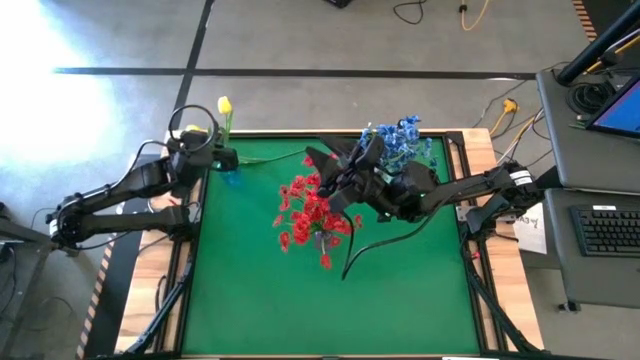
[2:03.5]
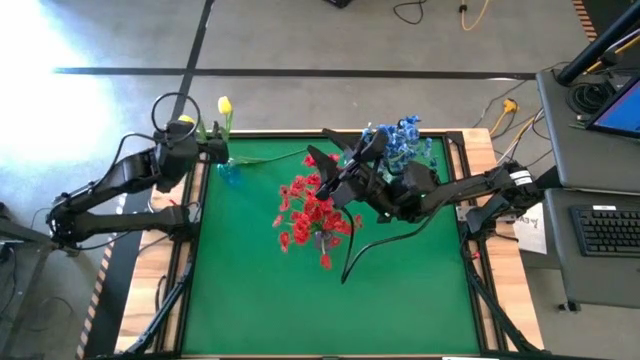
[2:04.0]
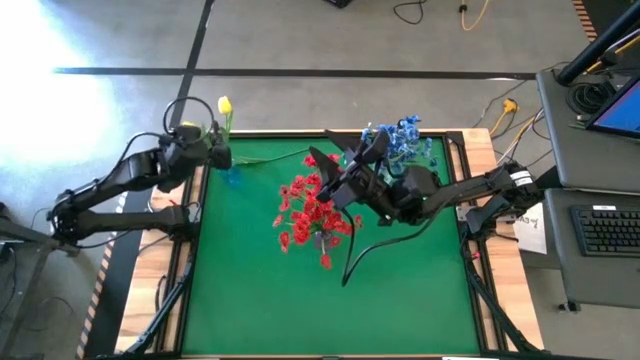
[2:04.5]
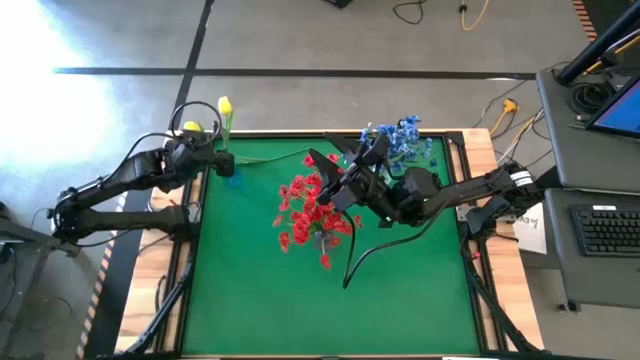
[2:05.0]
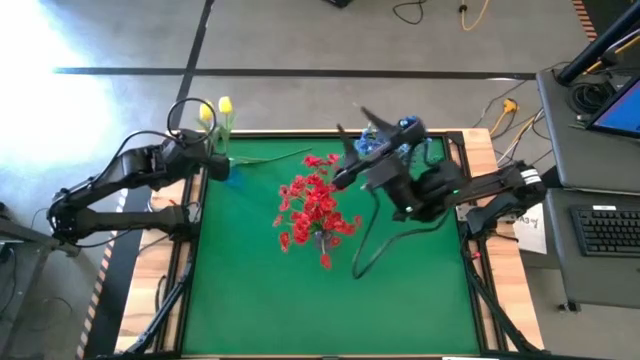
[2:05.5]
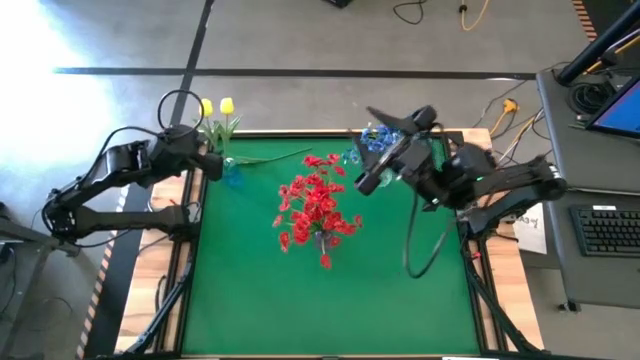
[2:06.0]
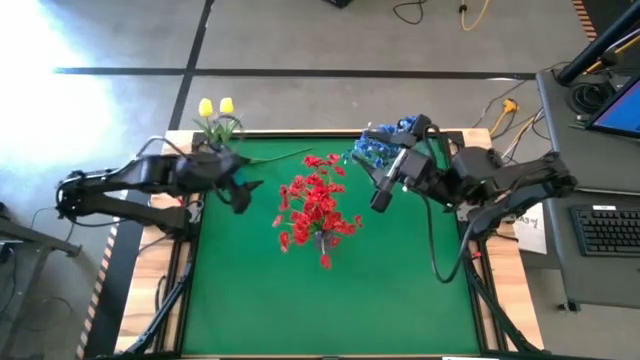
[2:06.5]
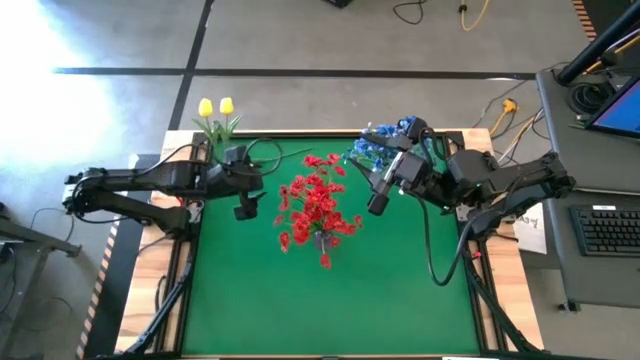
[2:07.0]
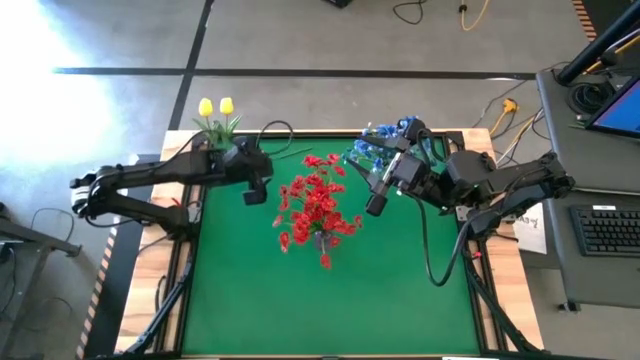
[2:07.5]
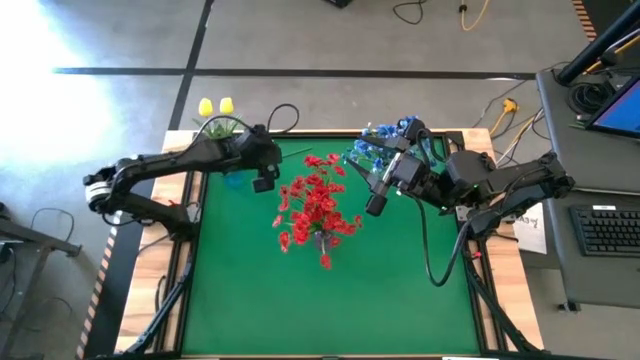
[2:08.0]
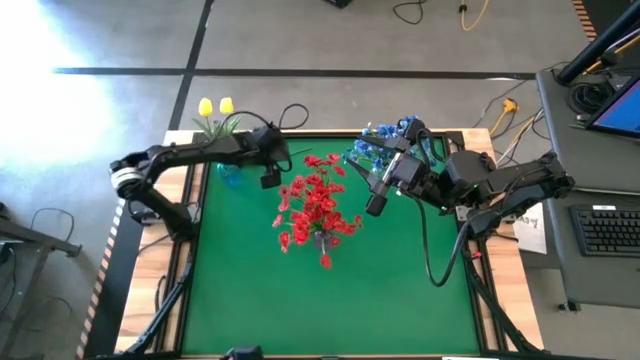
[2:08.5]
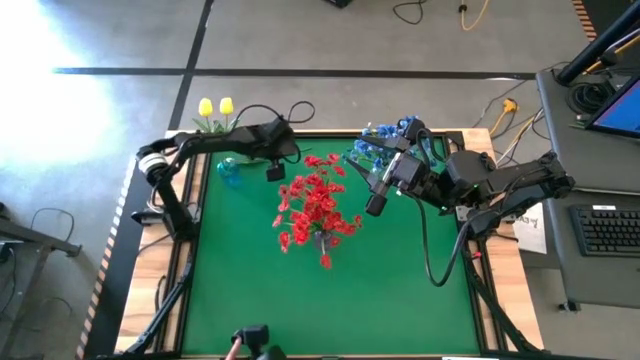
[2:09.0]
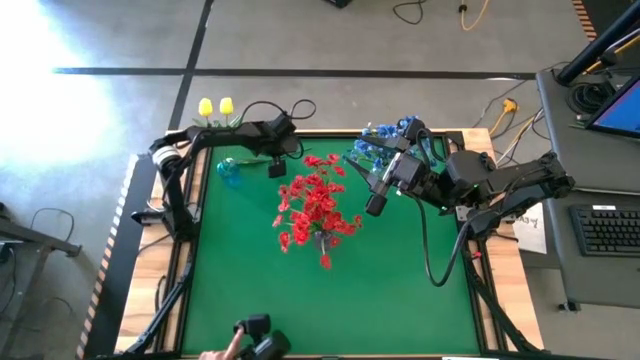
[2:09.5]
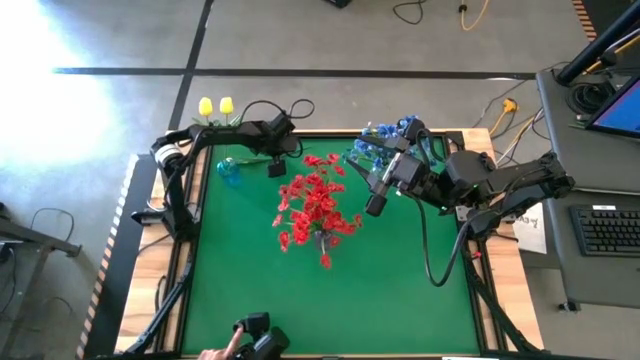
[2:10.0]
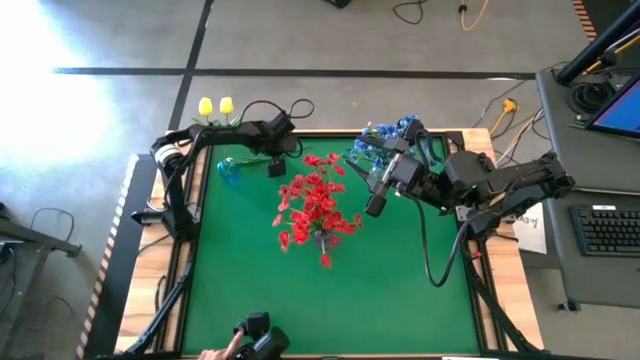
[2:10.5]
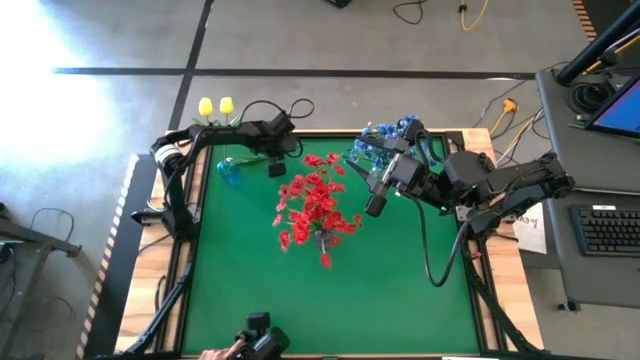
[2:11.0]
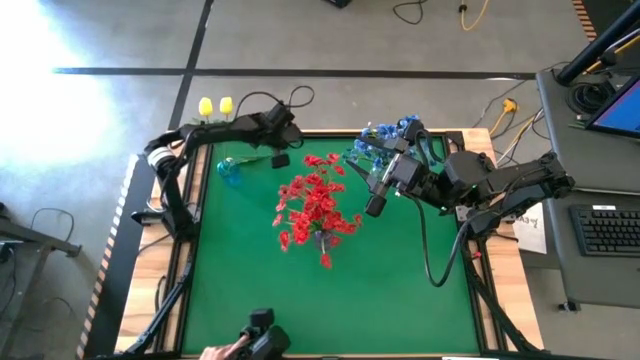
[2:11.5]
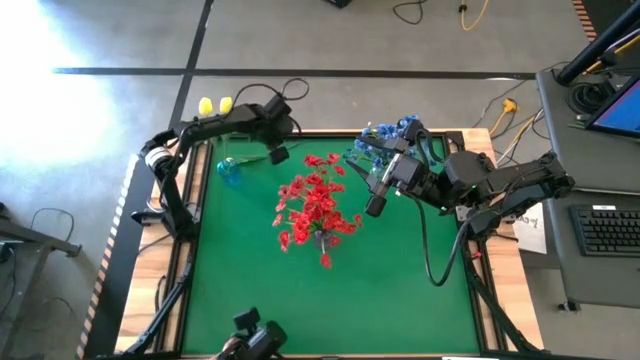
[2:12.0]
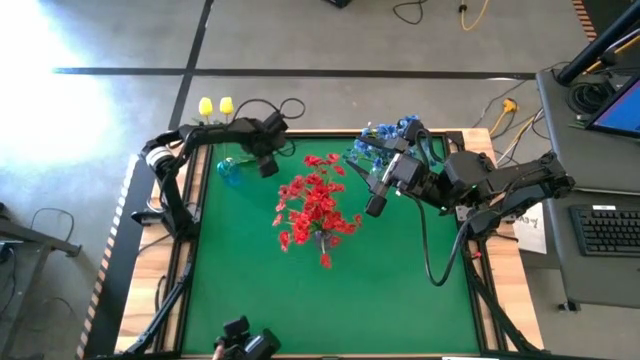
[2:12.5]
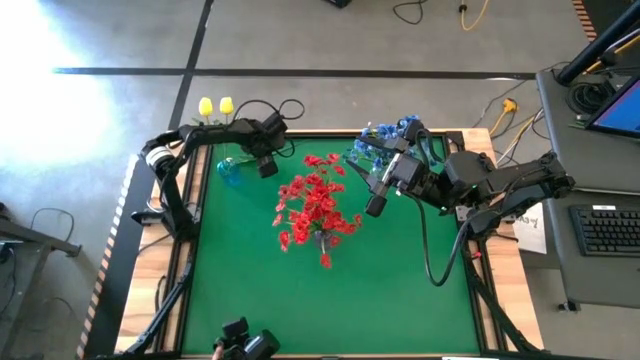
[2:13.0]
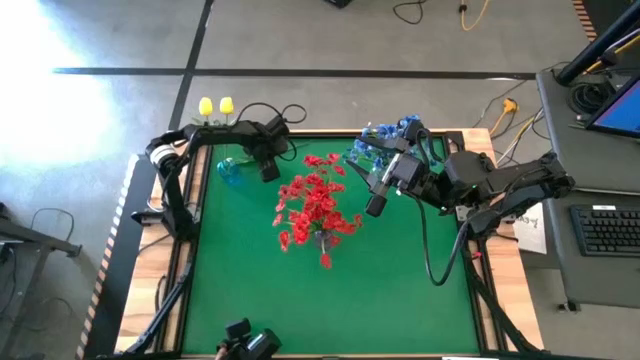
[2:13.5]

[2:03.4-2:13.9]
Task: Sort flowers into vase by color
Put the yellow flower into the blue vase

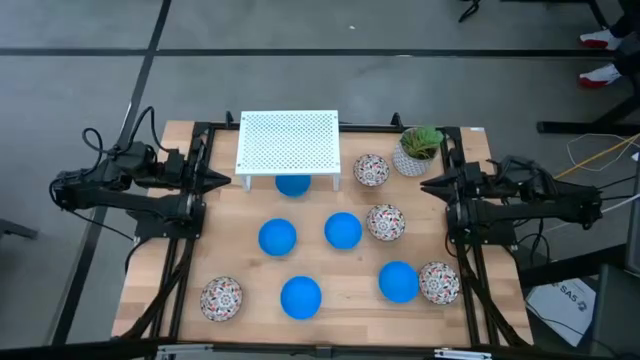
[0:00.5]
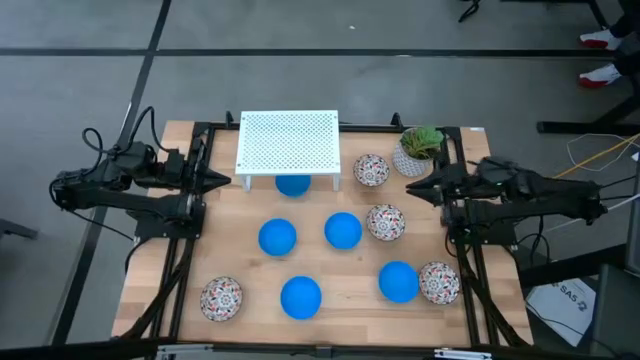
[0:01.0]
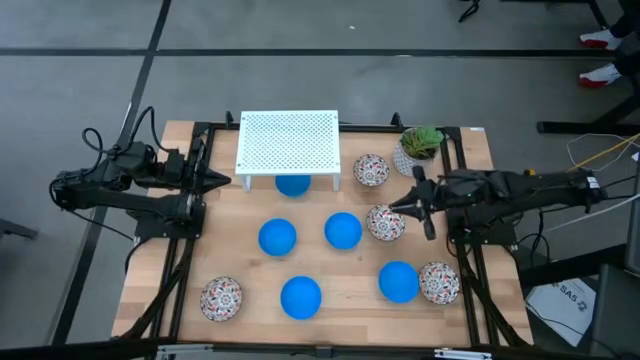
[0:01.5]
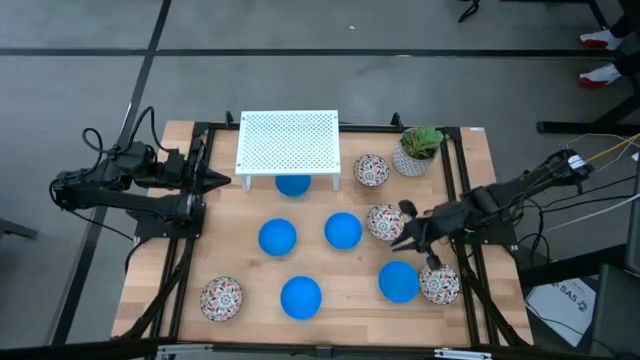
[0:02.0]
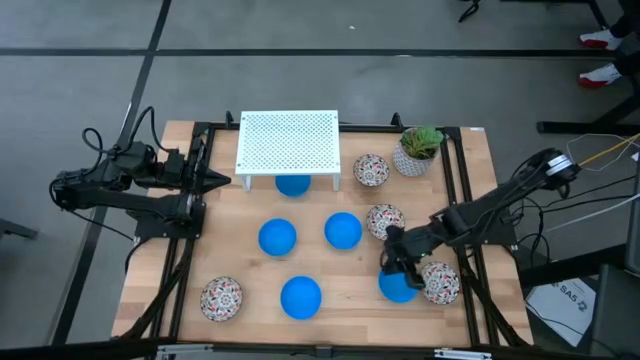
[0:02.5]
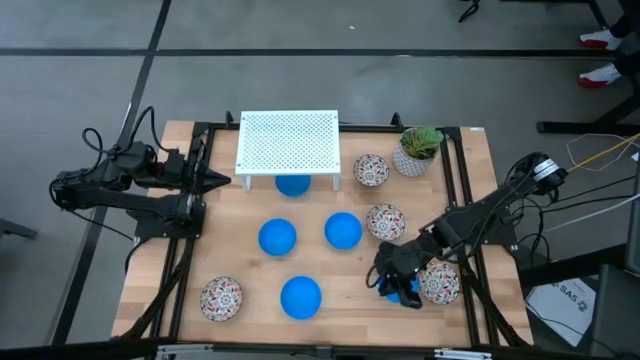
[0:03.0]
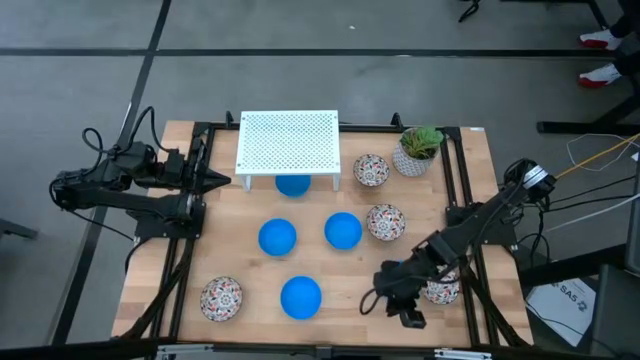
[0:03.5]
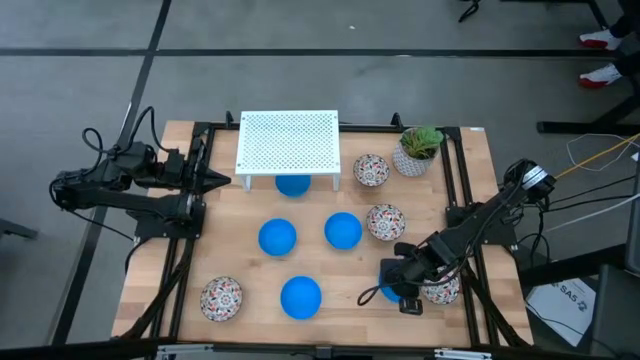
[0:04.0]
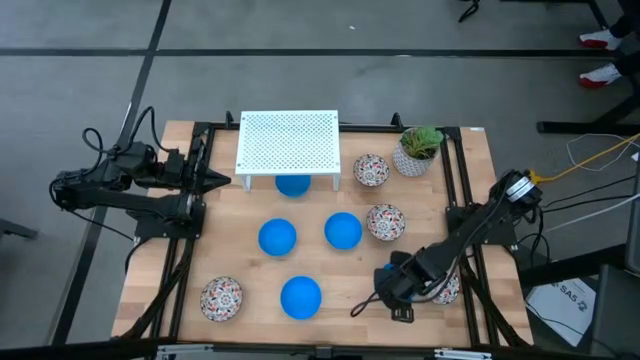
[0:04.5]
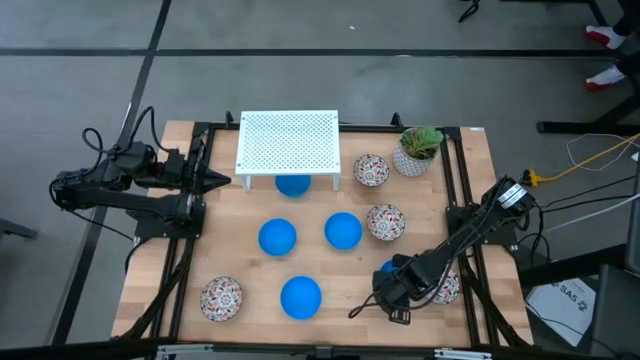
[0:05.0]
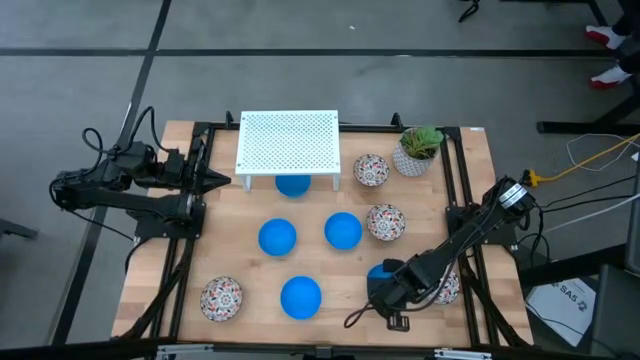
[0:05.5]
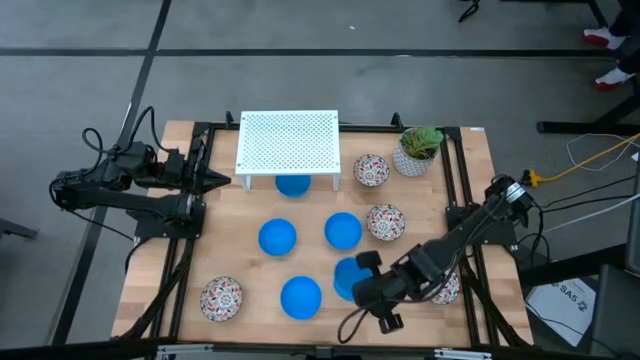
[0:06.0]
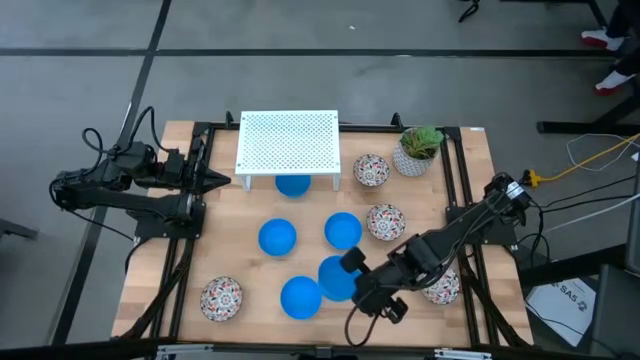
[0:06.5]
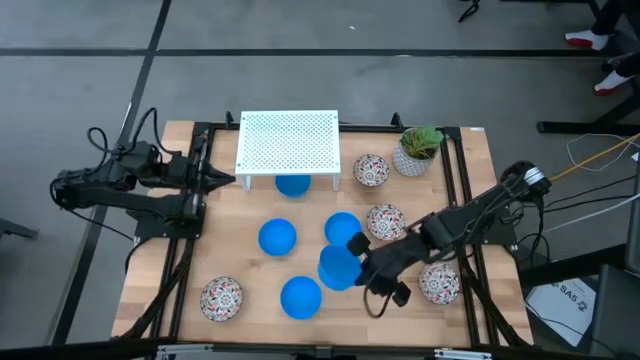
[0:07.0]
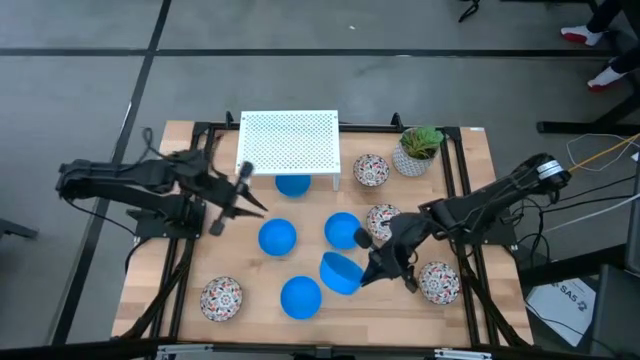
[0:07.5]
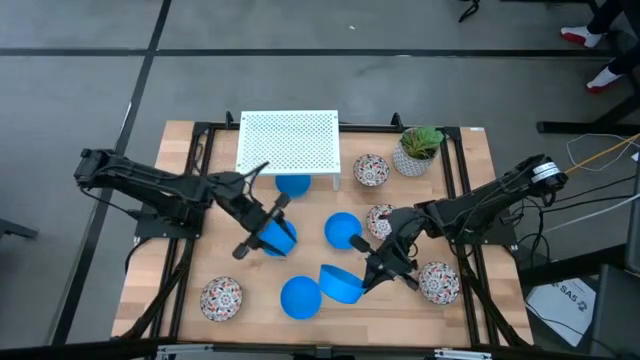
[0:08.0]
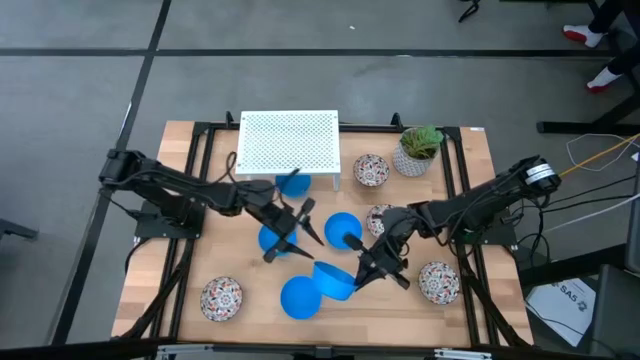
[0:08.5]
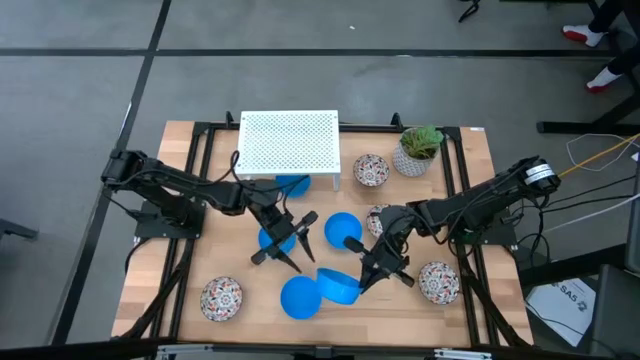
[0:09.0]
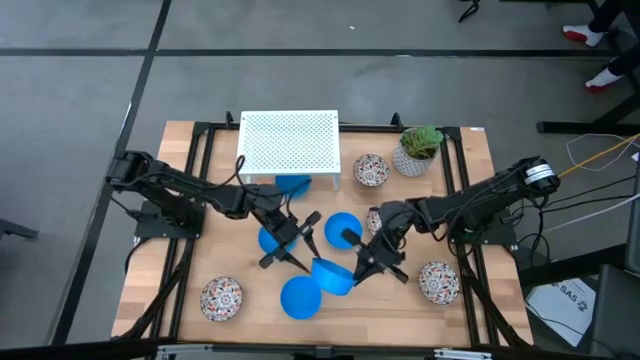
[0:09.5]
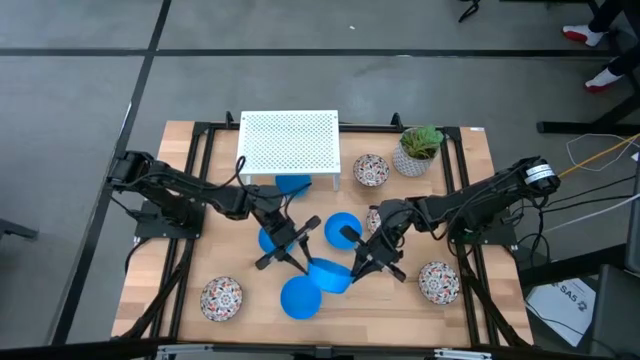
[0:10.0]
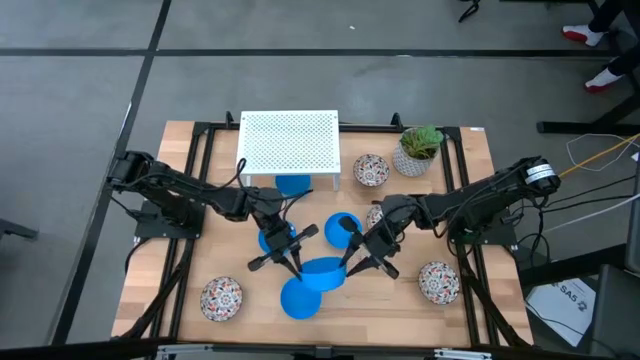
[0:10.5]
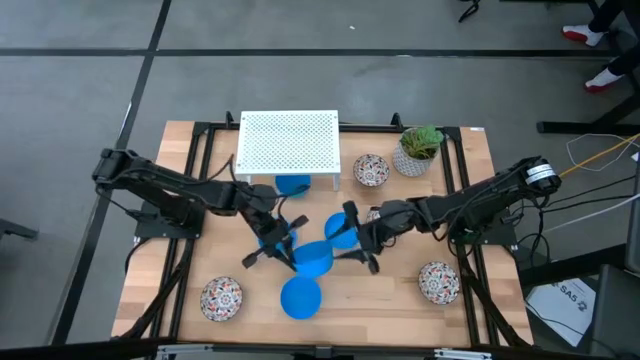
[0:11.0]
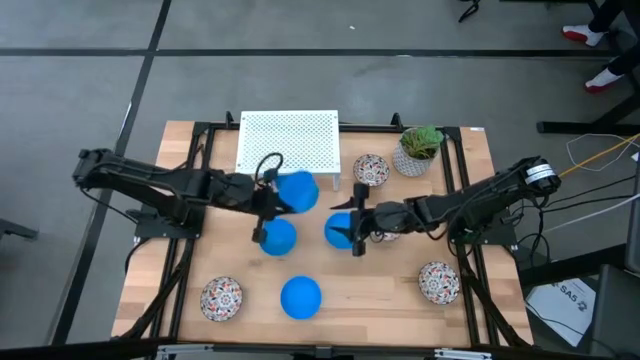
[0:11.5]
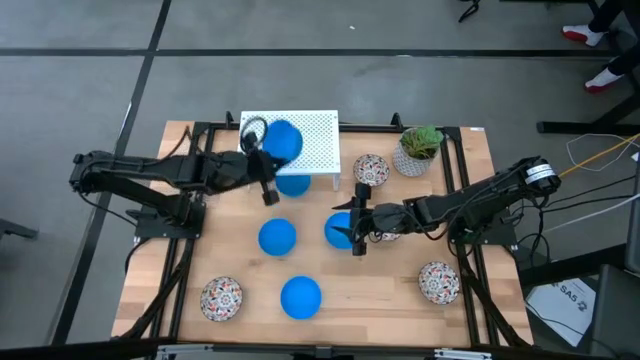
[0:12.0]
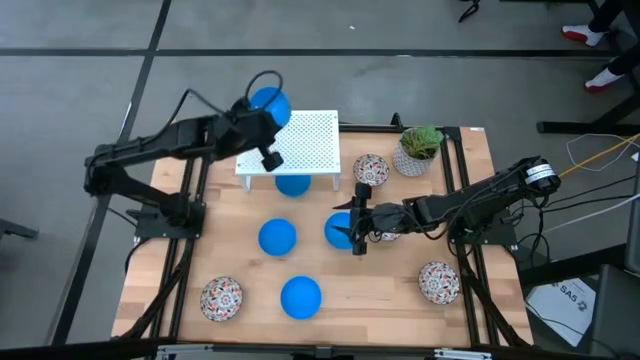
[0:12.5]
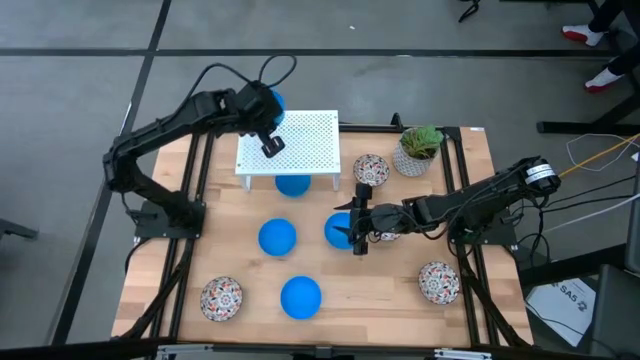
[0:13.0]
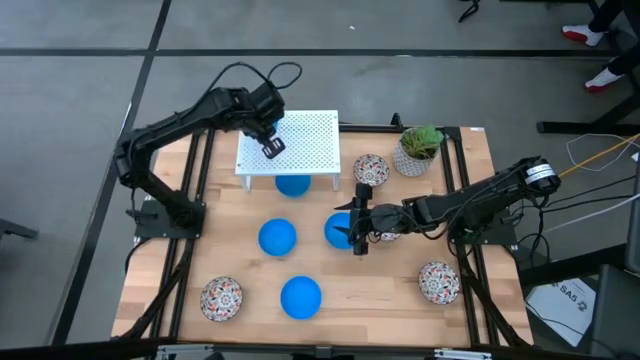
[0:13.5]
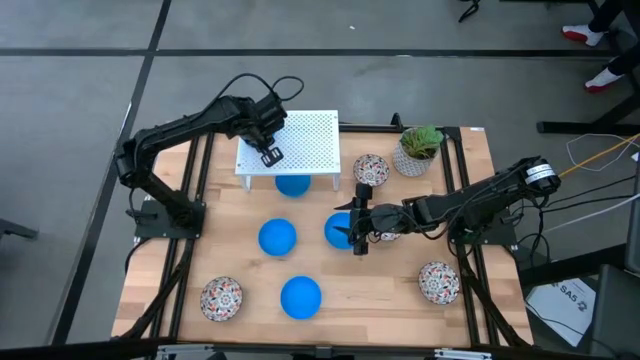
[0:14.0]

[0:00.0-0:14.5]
Task: Pick & Place Mini bowls
Put the blue bowl on the shelf
